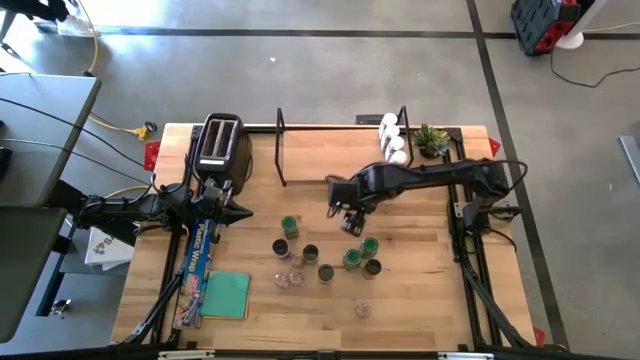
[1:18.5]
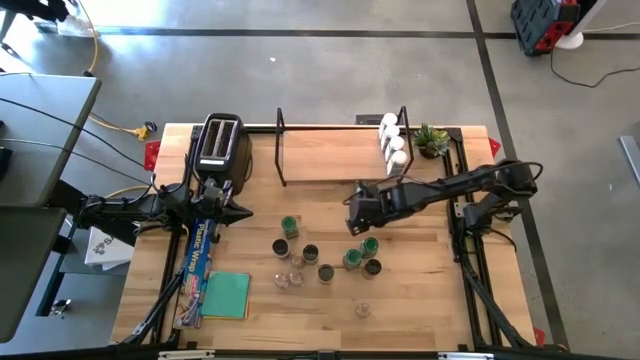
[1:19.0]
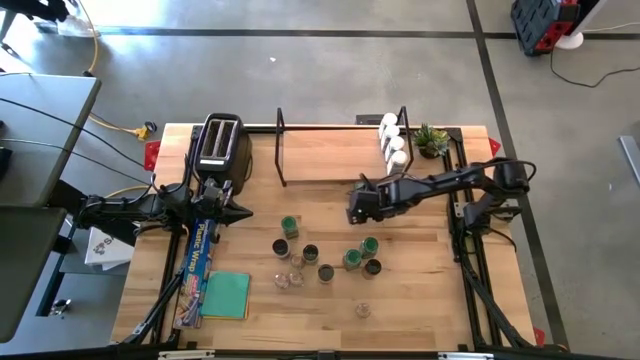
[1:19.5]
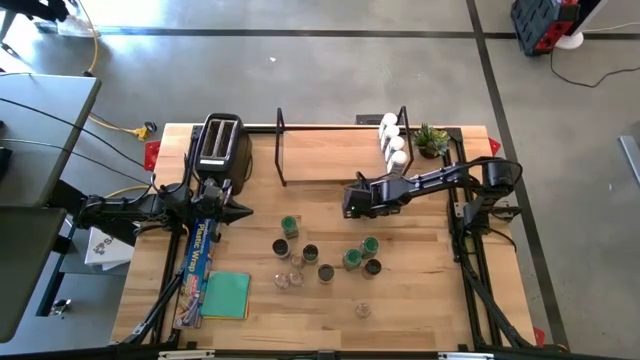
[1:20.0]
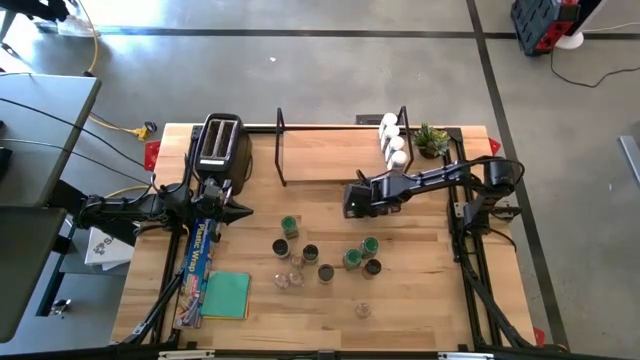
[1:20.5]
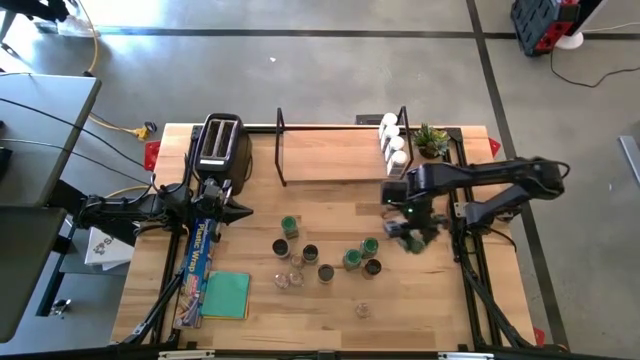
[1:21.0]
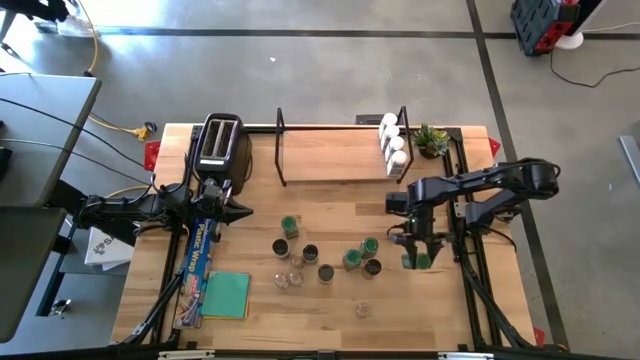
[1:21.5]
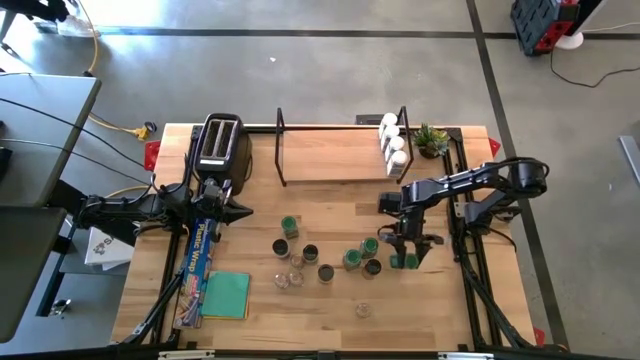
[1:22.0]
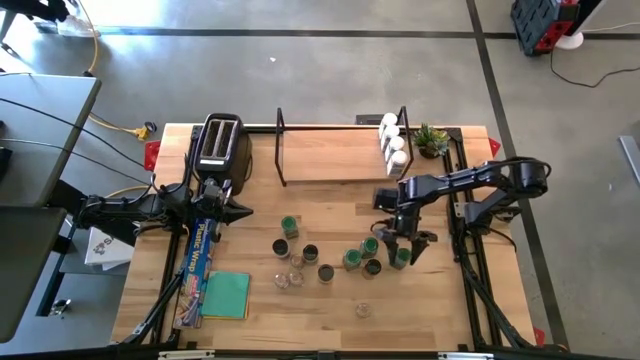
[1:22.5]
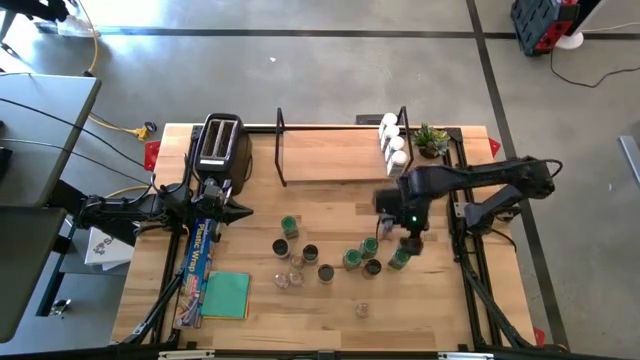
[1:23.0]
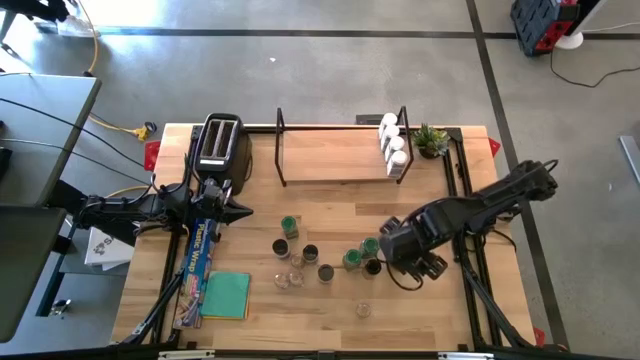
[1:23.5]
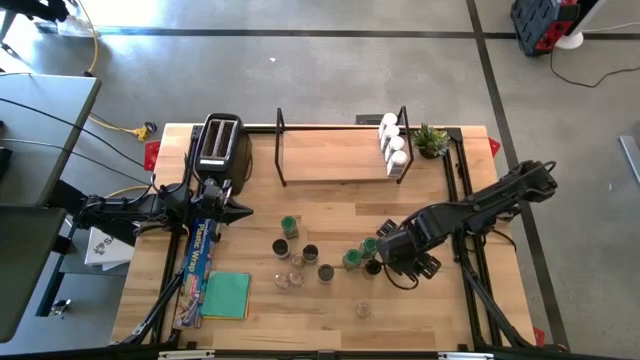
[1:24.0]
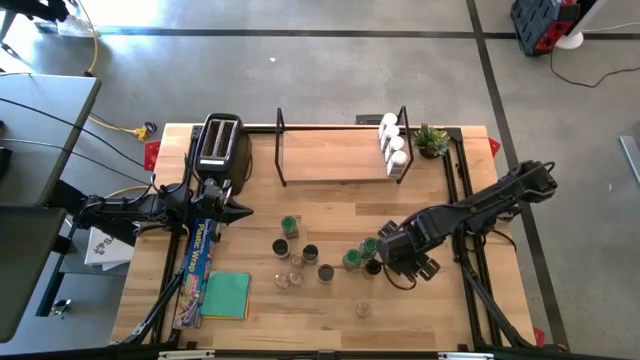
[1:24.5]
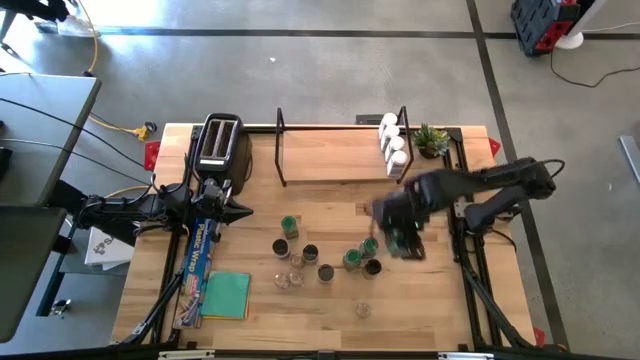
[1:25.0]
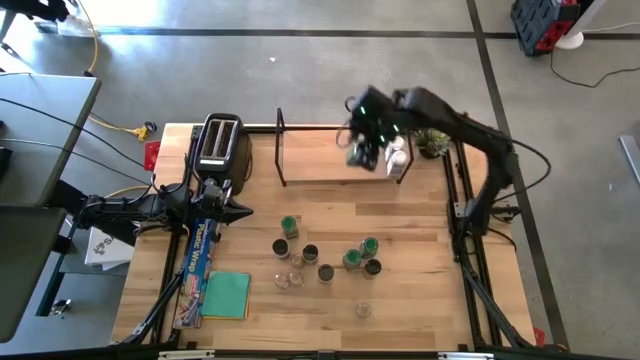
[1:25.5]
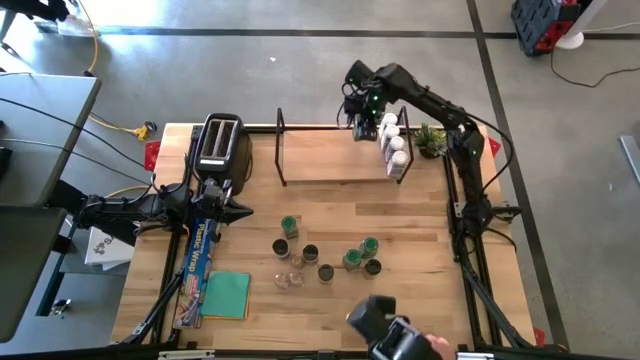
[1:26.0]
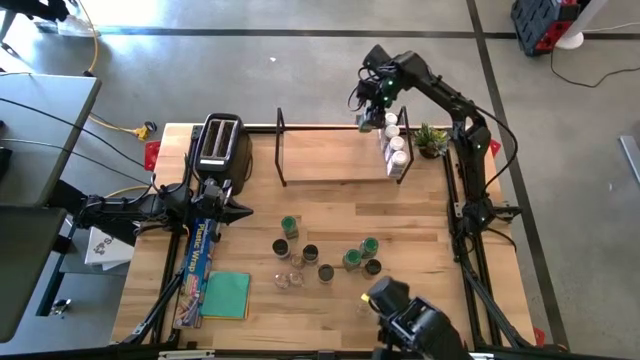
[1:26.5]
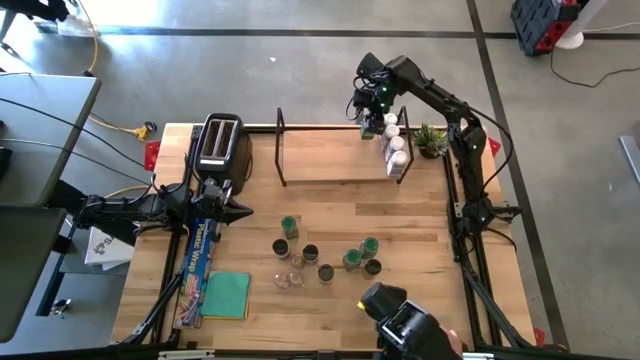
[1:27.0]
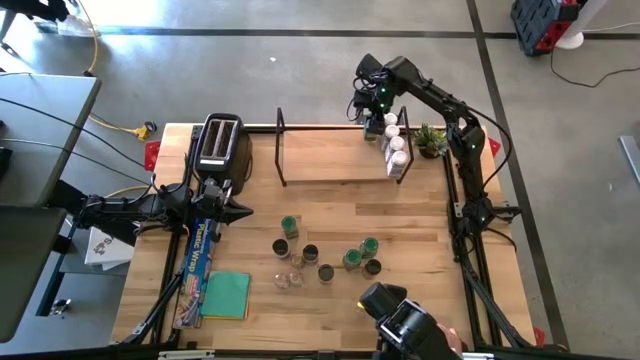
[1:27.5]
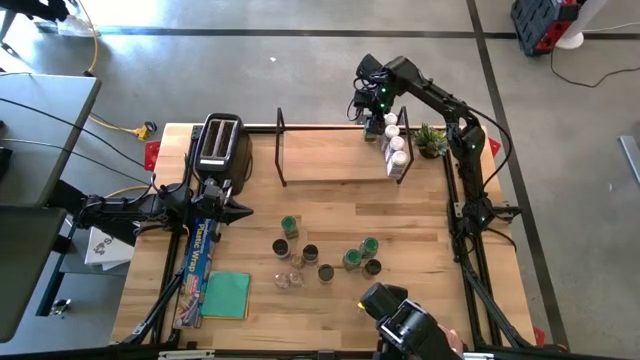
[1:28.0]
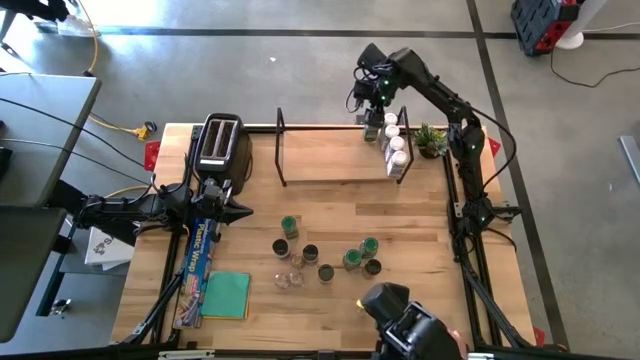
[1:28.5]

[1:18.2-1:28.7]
Task: Shelf spices
Put the green seasoning bottle on the shelf

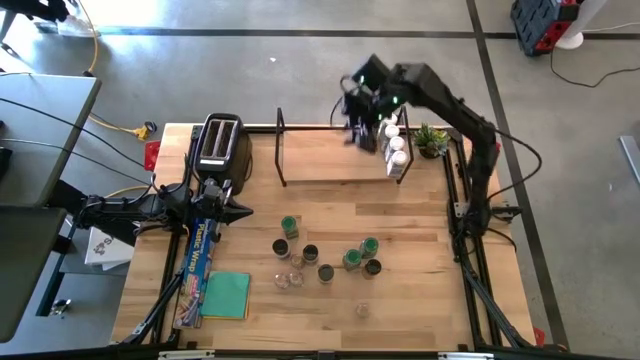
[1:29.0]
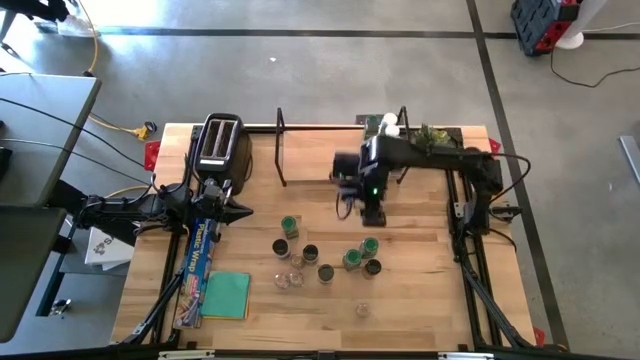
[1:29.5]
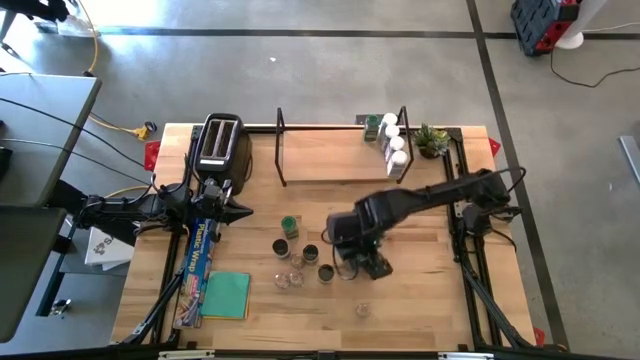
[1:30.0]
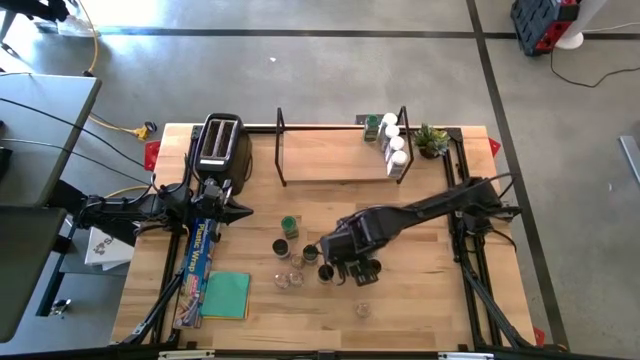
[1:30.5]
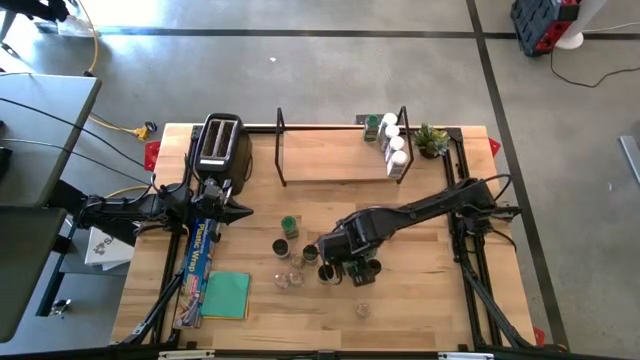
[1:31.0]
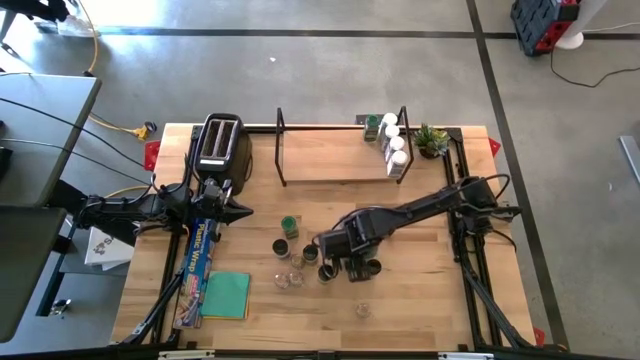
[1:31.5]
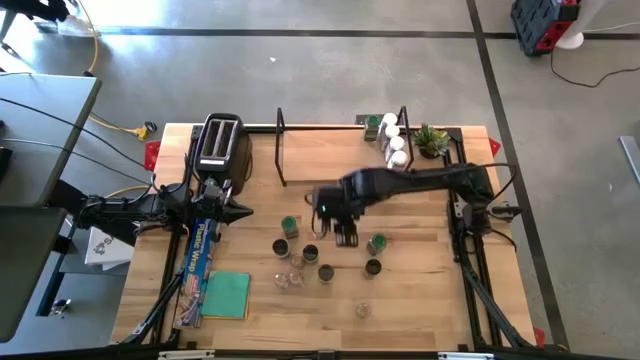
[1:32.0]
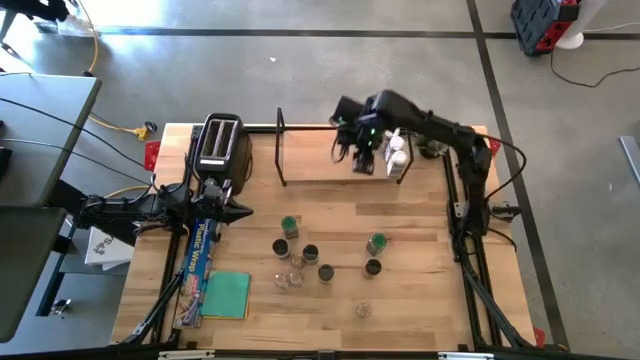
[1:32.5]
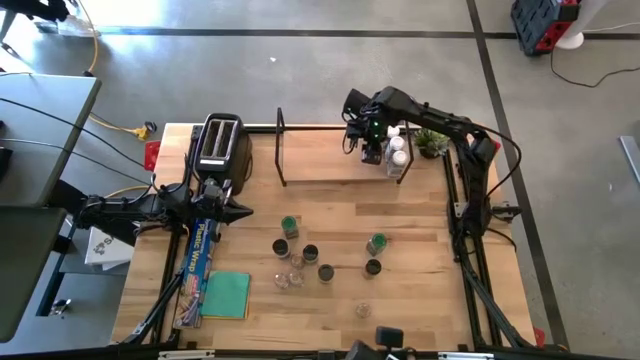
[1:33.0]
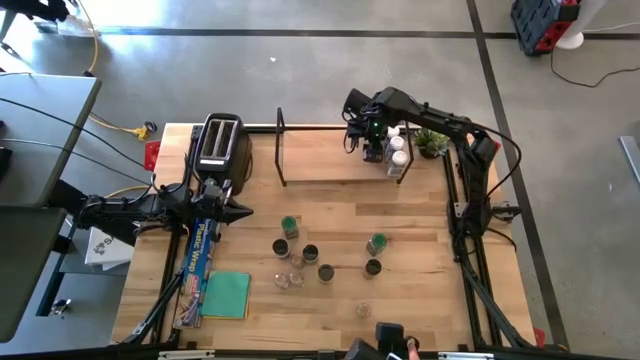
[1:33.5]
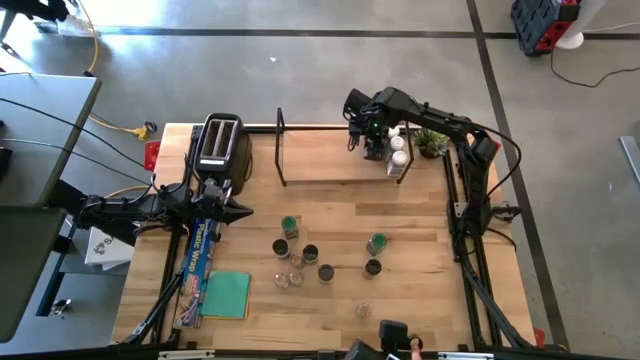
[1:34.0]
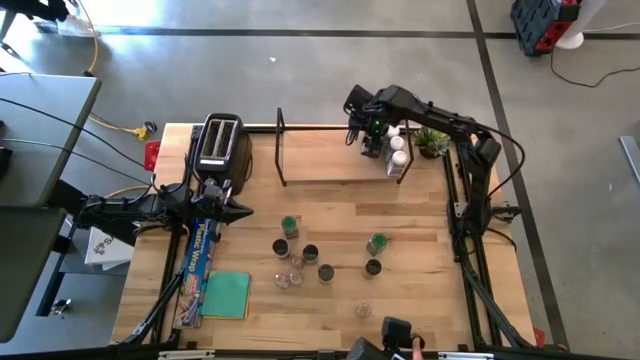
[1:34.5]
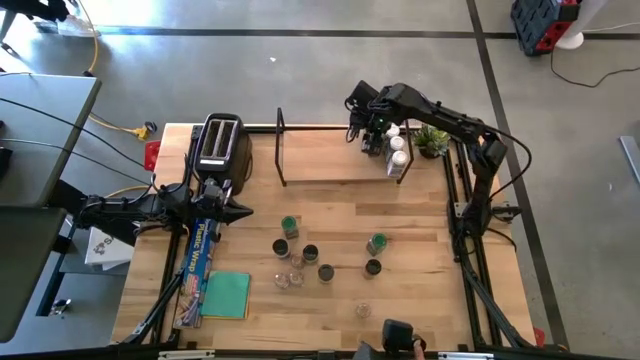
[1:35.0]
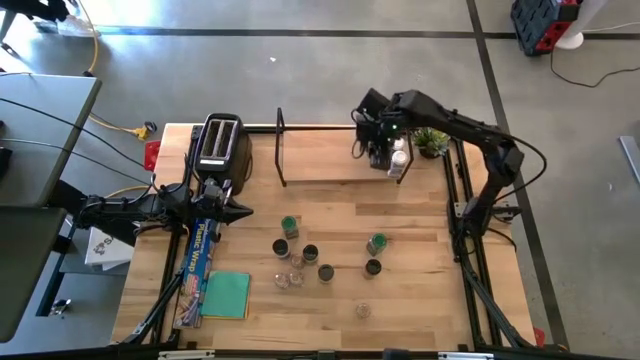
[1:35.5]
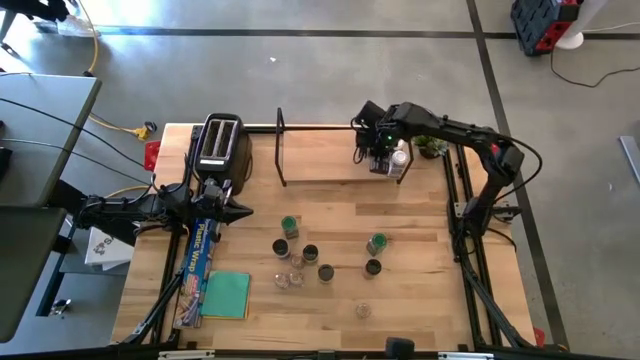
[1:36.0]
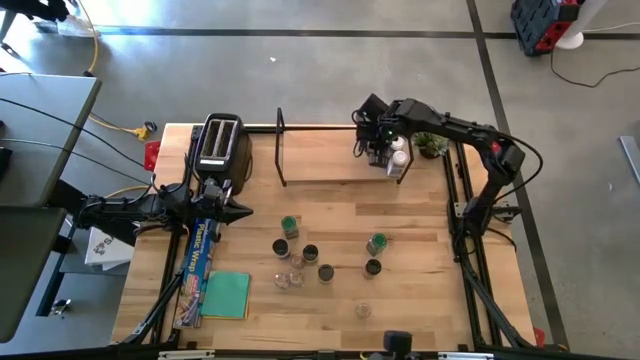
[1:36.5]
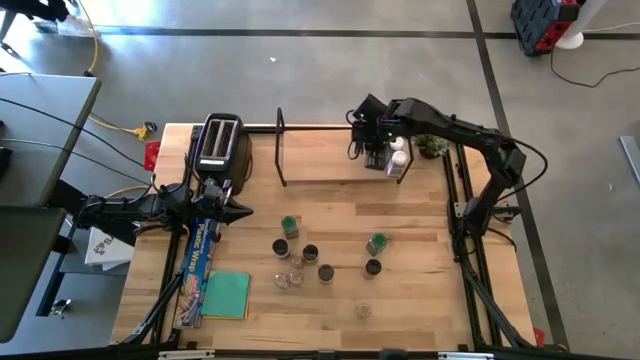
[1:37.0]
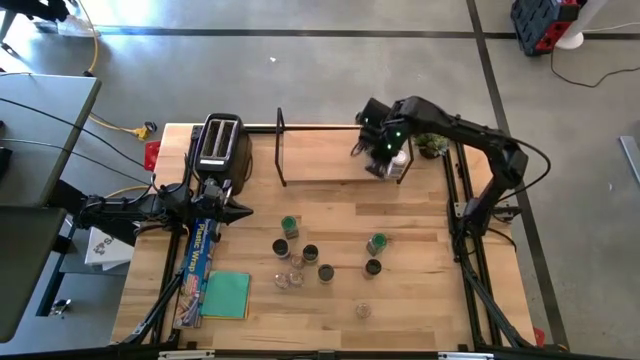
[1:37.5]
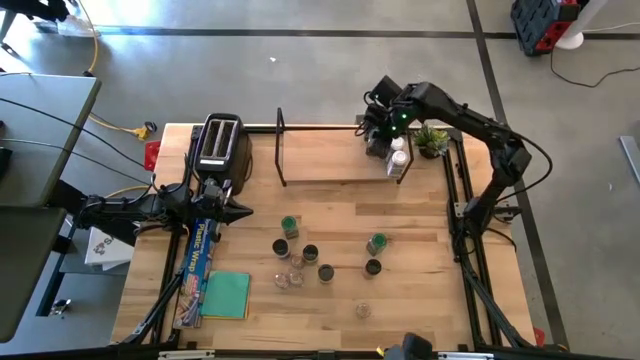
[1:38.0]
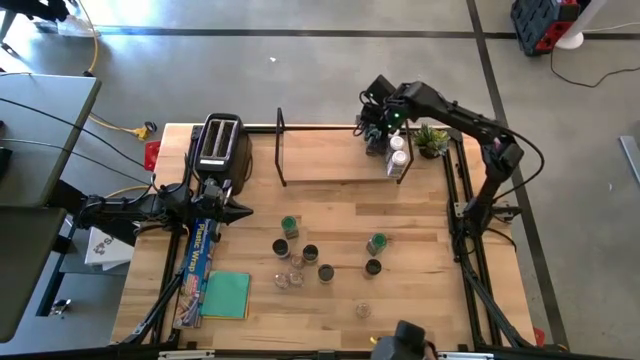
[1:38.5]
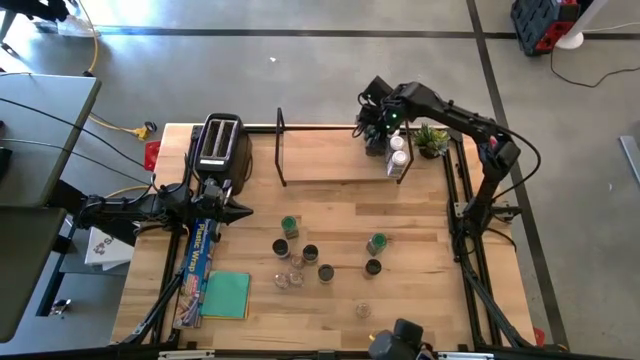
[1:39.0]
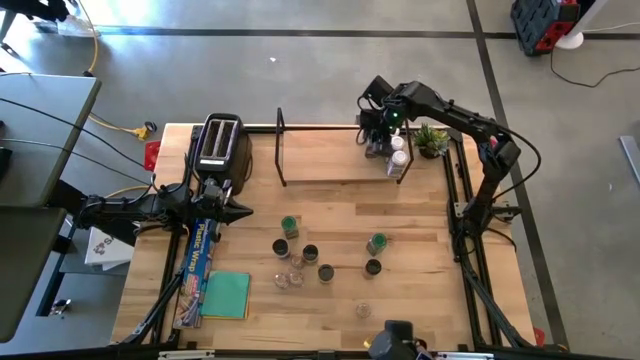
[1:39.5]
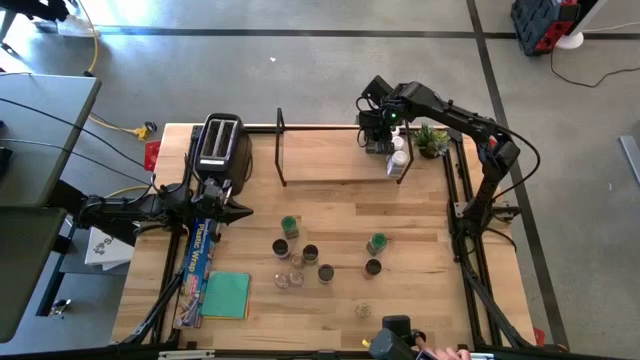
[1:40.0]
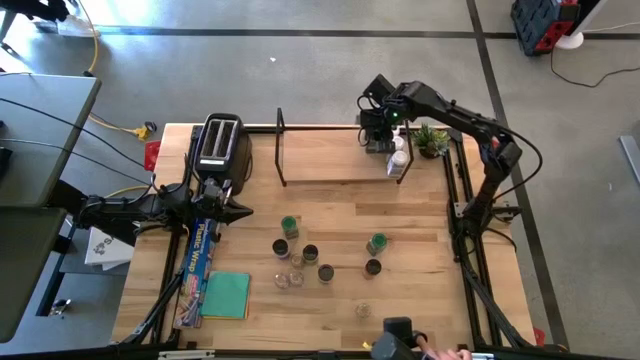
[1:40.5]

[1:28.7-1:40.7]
Put the green seasoning bottle on the shelf and align it with the other green seasoning bottle
